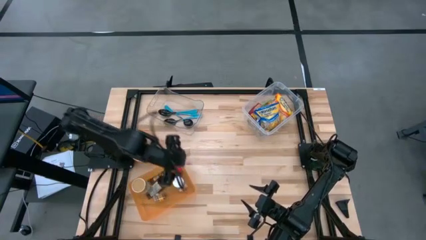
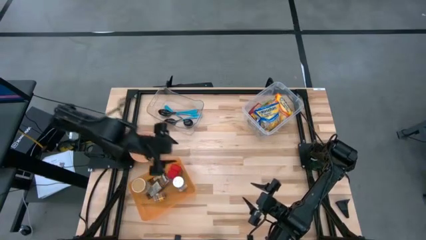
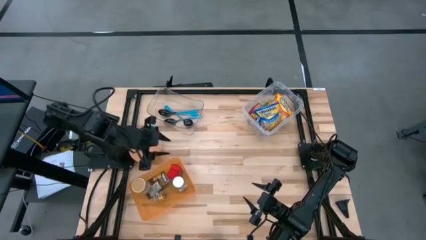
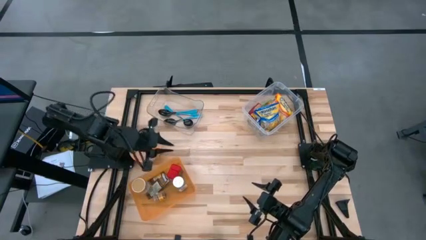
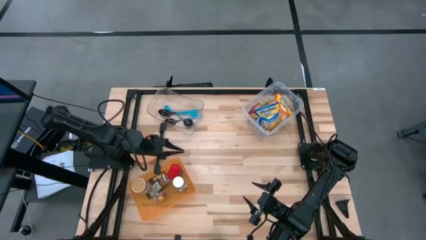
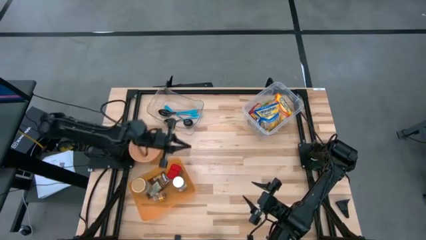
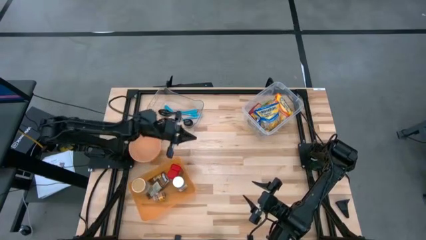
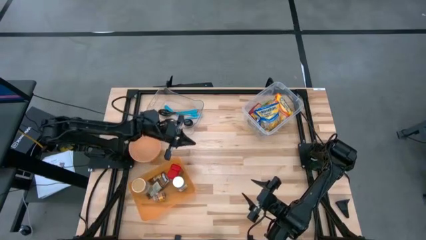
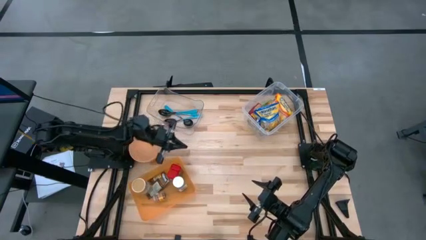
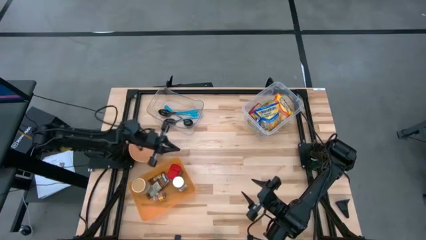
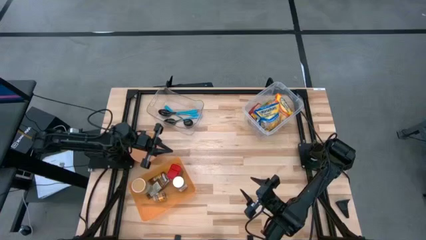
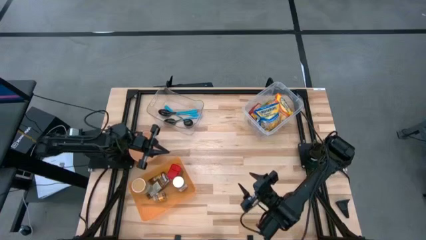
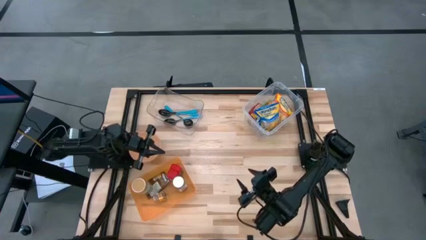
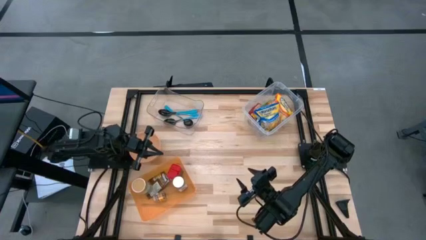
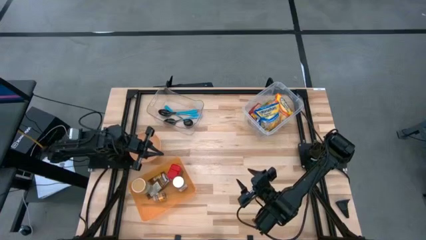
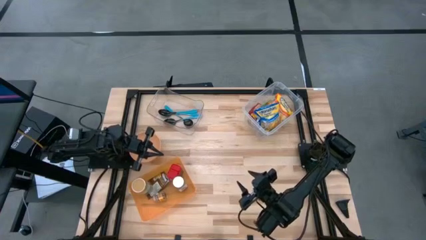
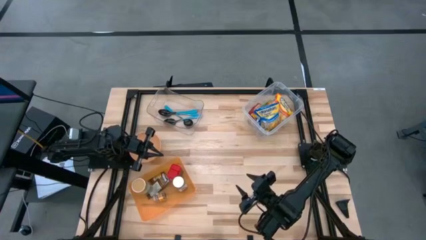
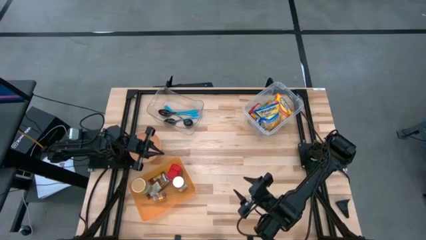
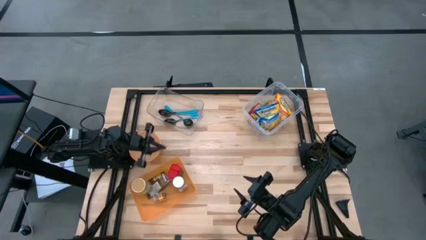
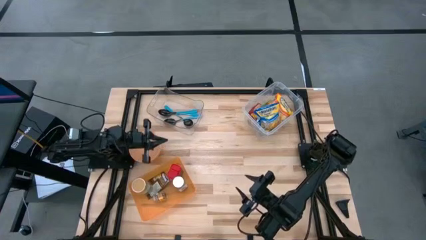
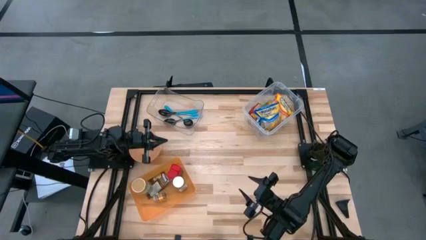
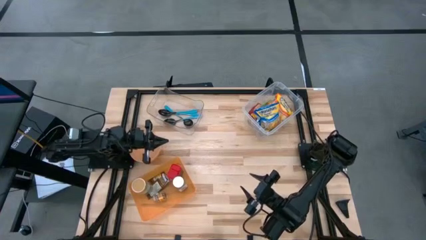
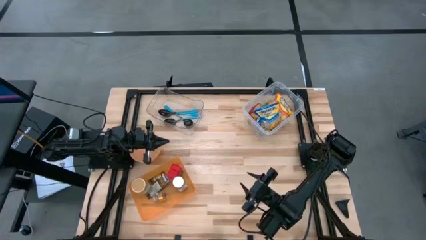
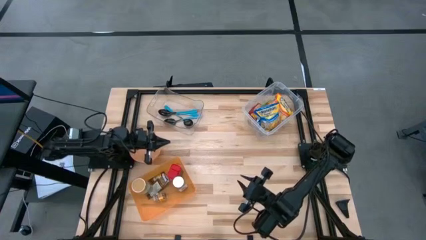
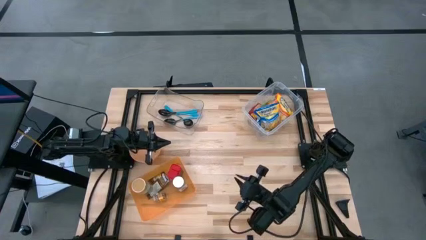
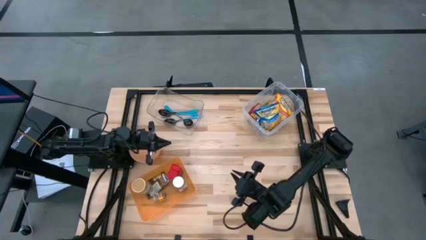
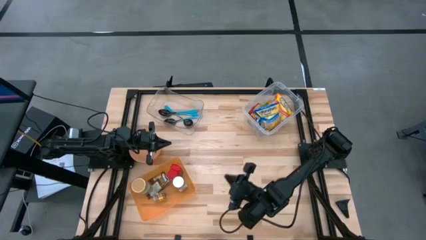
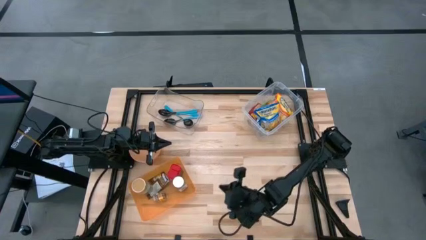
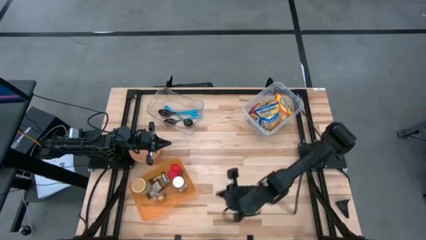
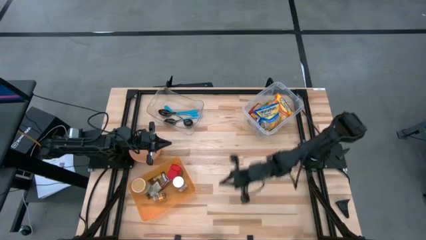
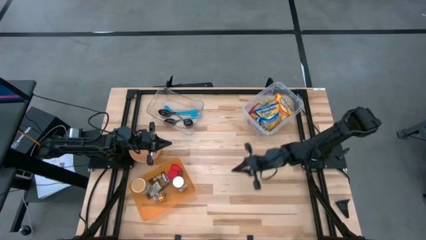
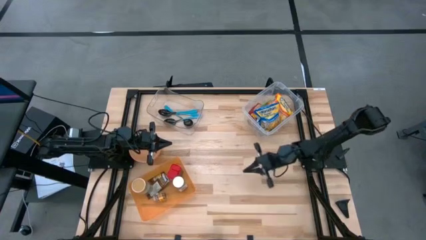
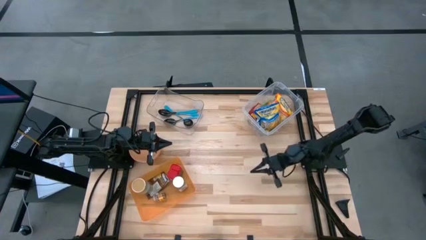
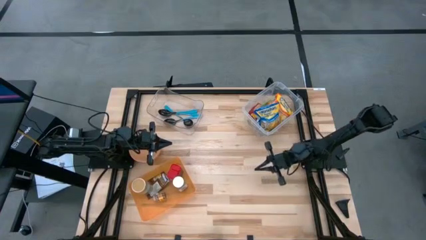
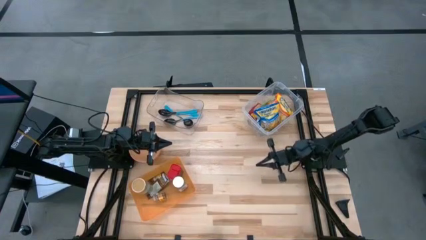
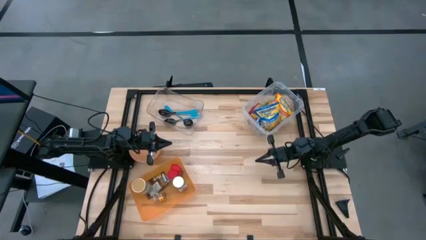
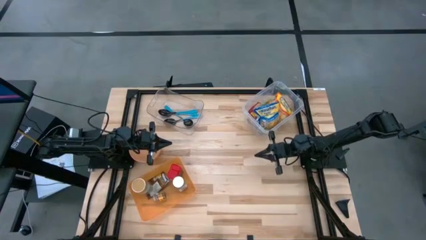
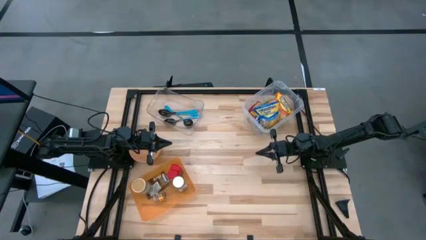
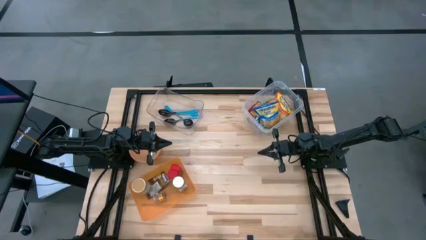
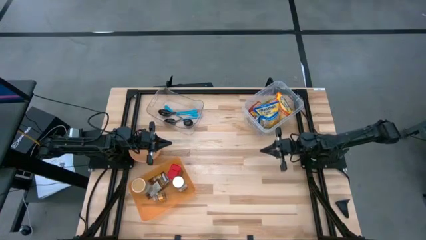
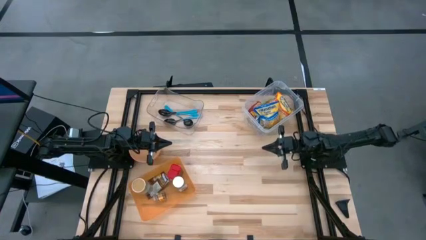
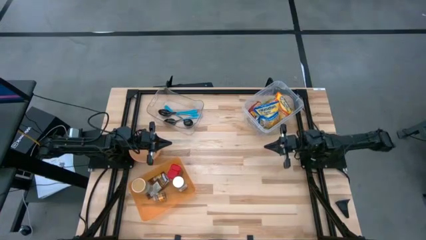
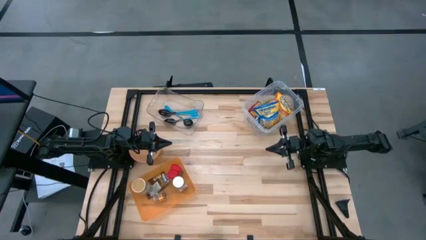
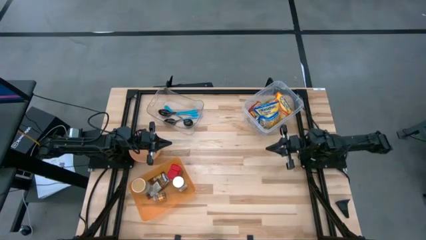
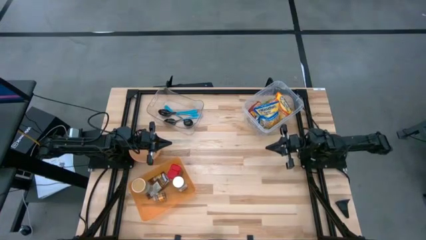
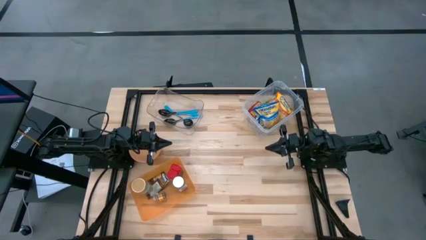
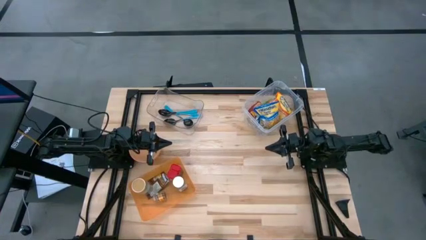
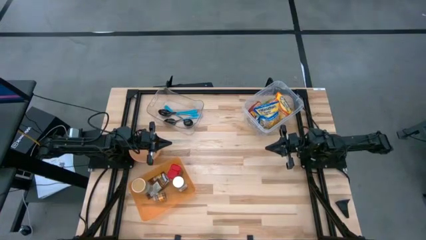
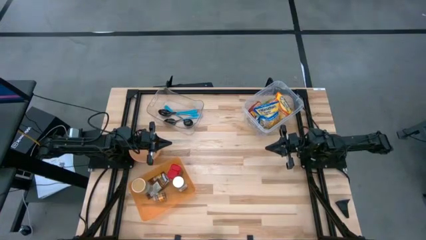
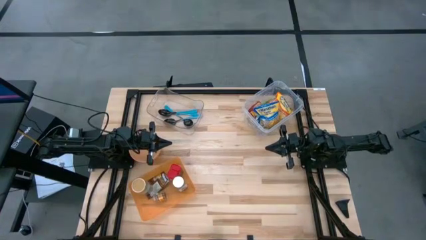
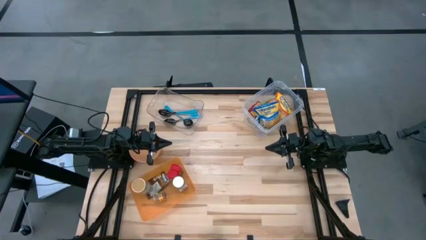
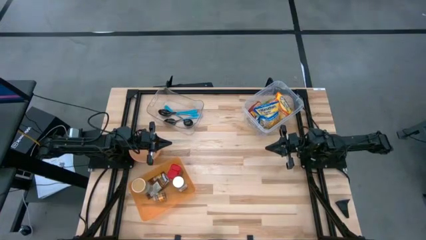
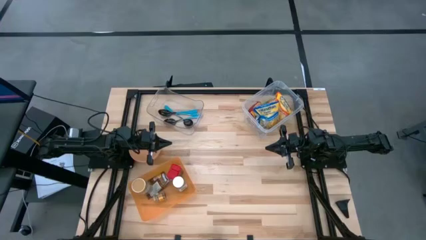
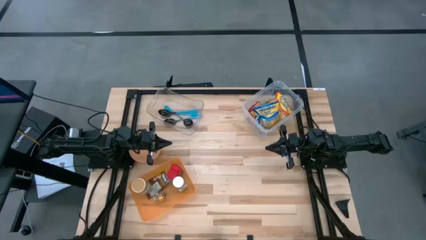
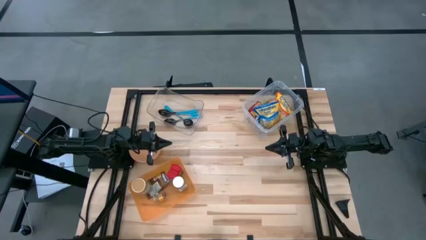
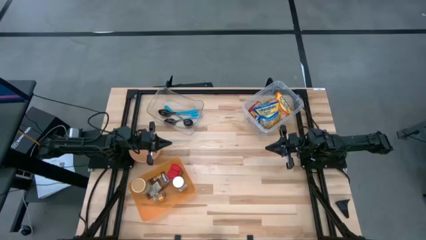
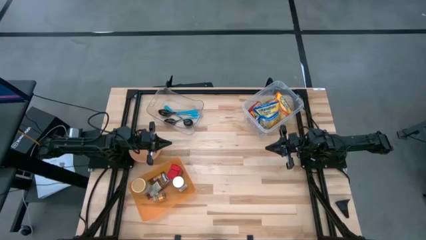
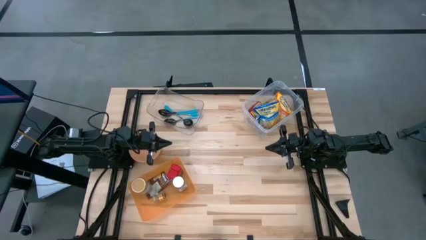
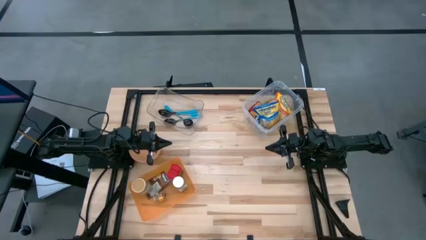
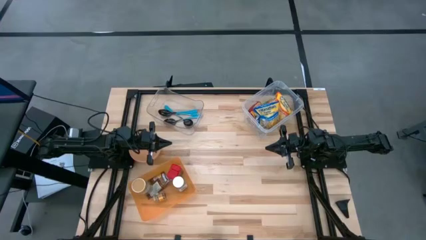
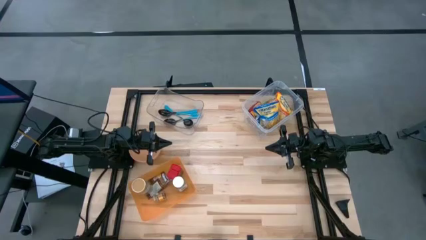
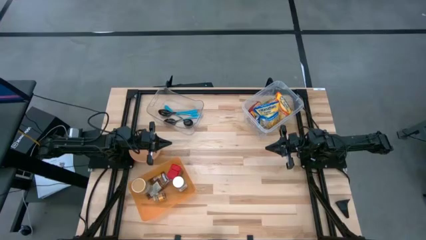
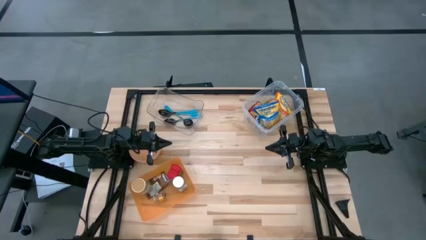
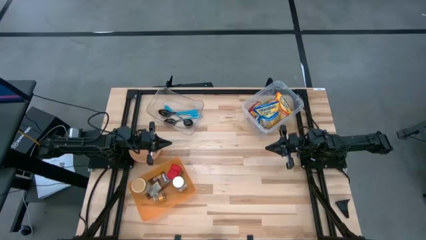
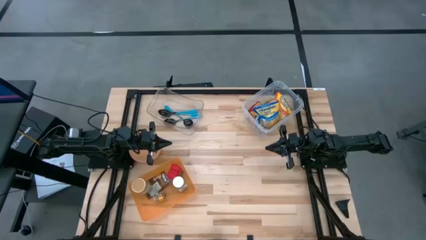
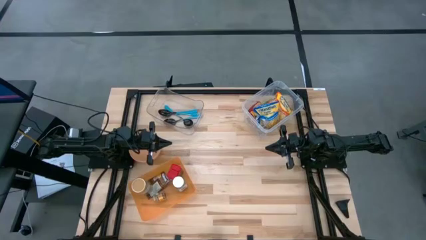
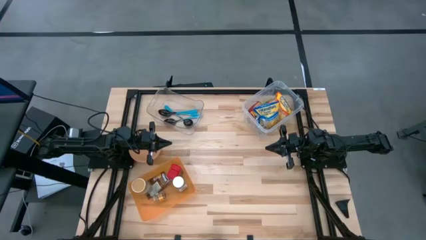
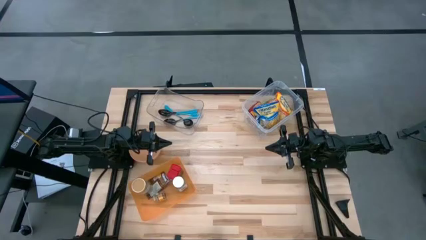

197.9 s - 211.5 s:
Task: Pick & Place Food Item
Return to Home Position
